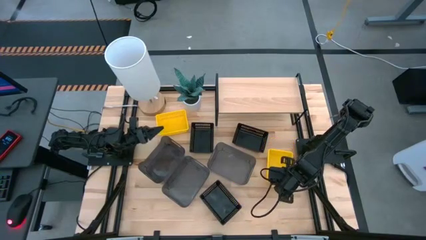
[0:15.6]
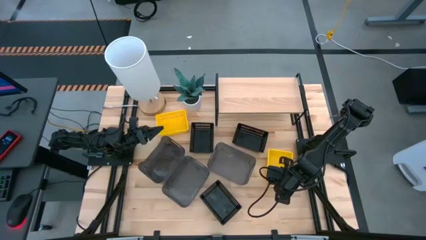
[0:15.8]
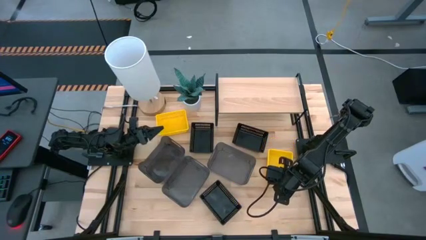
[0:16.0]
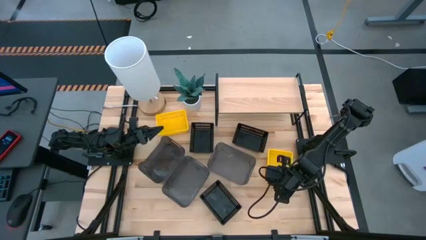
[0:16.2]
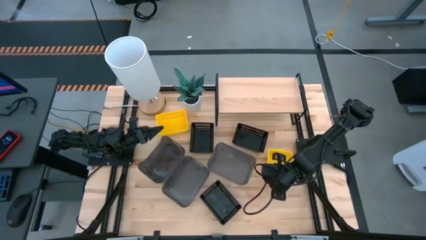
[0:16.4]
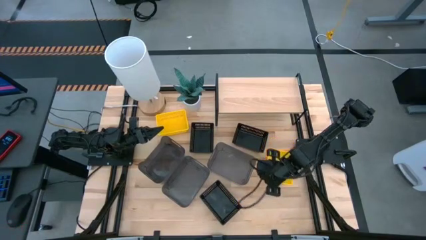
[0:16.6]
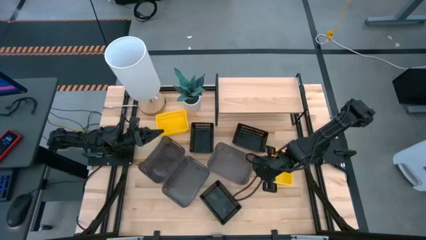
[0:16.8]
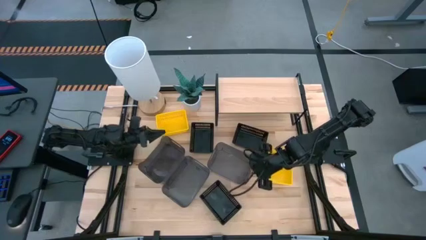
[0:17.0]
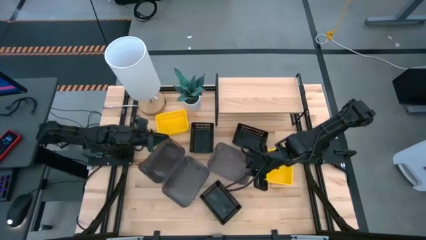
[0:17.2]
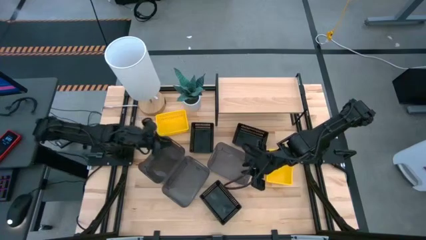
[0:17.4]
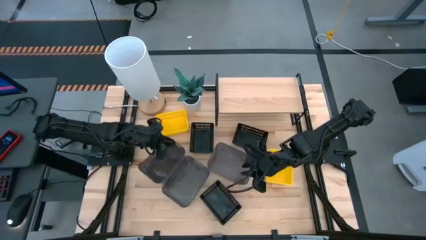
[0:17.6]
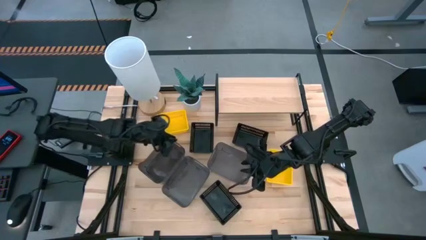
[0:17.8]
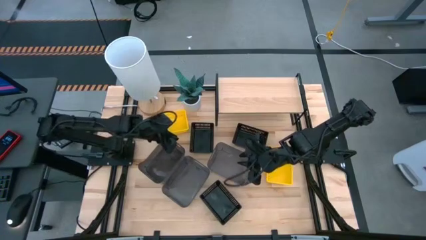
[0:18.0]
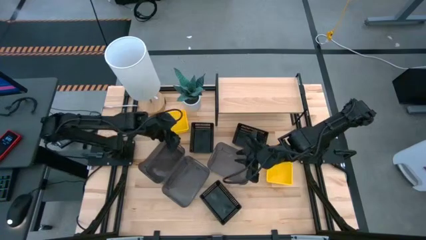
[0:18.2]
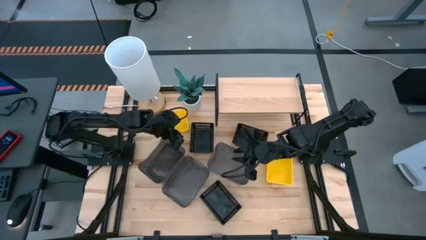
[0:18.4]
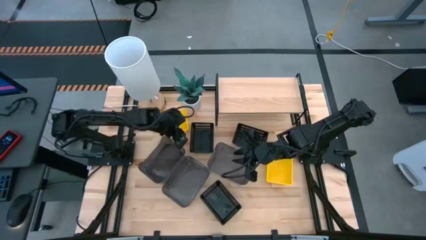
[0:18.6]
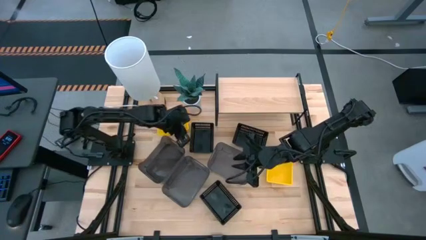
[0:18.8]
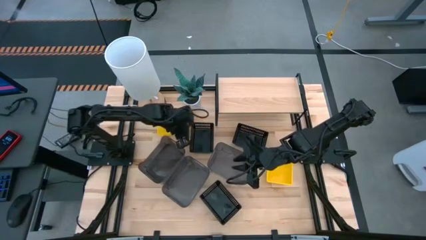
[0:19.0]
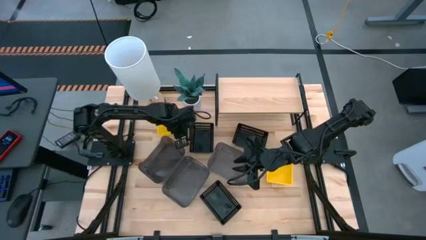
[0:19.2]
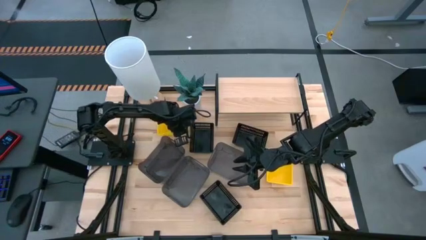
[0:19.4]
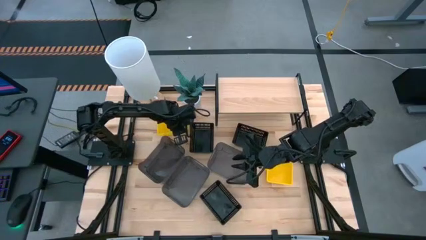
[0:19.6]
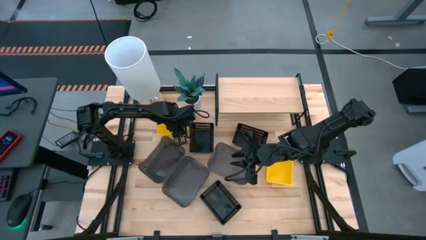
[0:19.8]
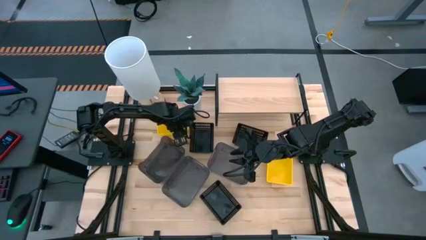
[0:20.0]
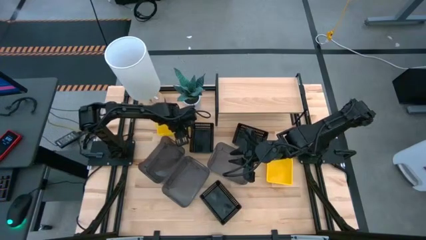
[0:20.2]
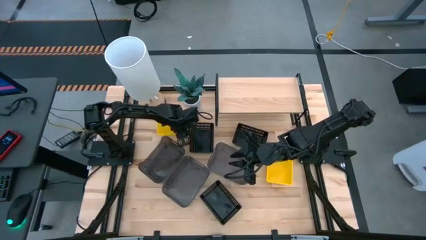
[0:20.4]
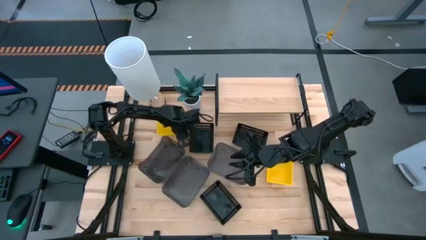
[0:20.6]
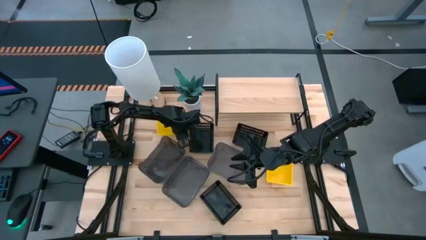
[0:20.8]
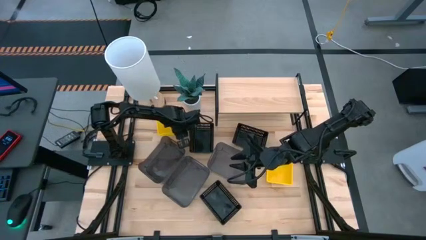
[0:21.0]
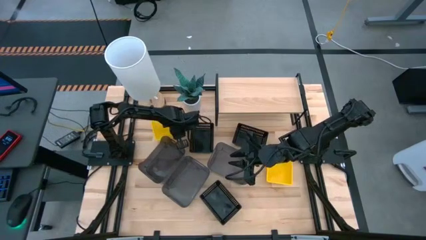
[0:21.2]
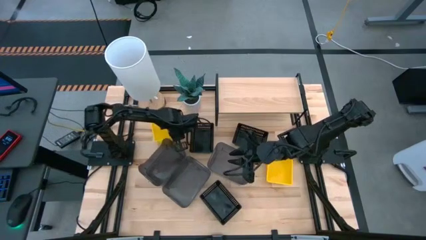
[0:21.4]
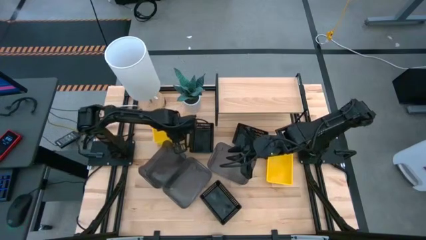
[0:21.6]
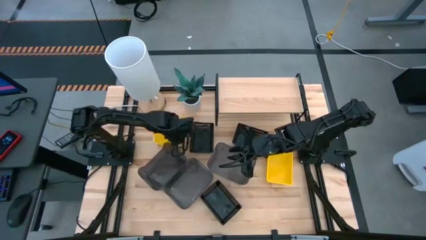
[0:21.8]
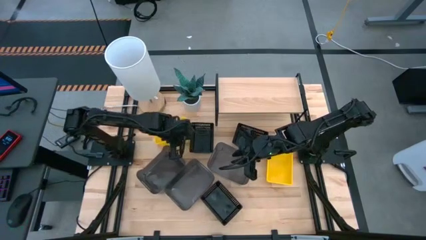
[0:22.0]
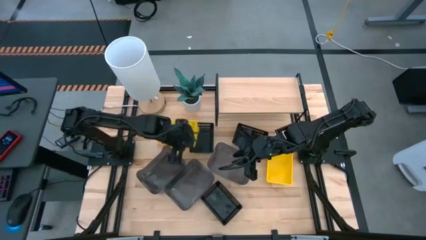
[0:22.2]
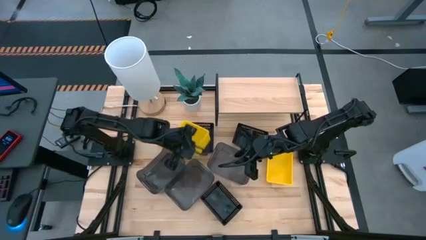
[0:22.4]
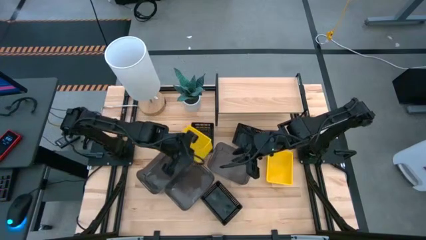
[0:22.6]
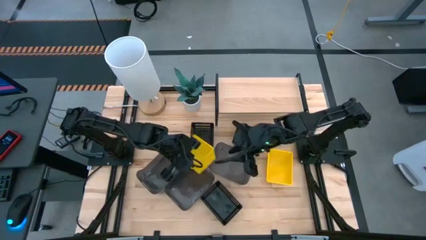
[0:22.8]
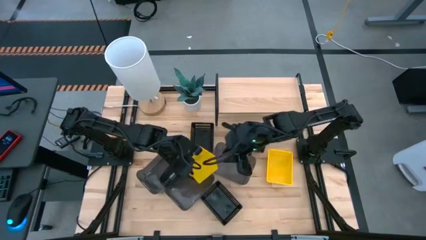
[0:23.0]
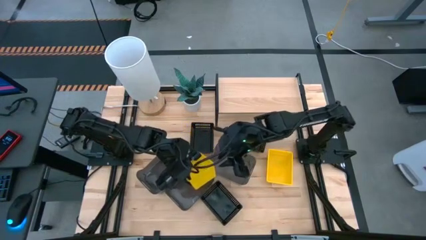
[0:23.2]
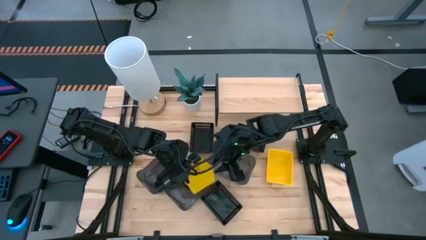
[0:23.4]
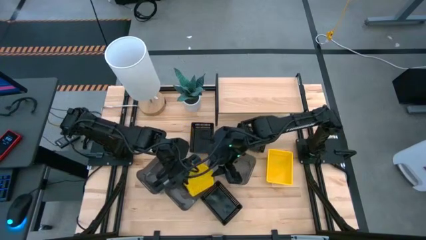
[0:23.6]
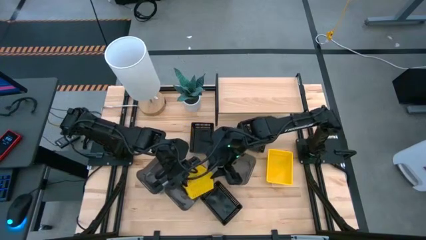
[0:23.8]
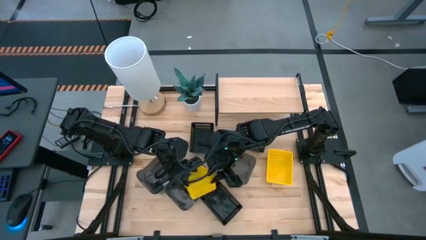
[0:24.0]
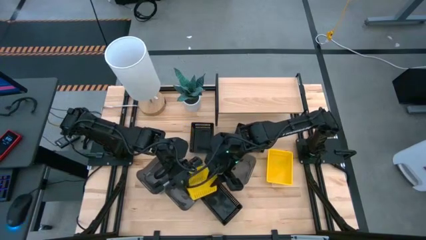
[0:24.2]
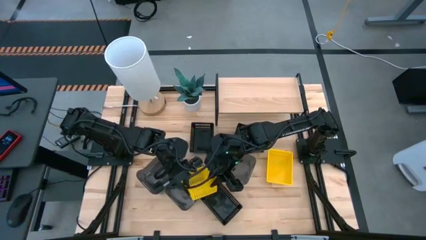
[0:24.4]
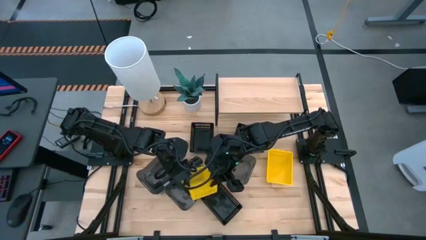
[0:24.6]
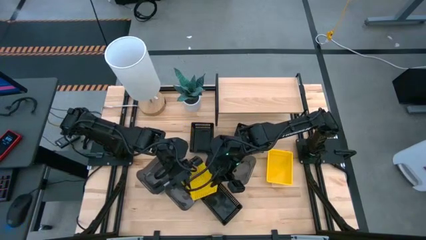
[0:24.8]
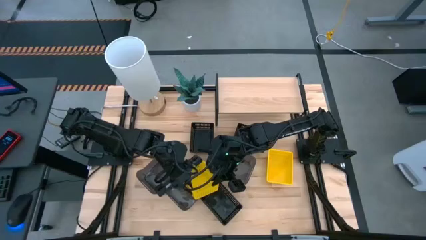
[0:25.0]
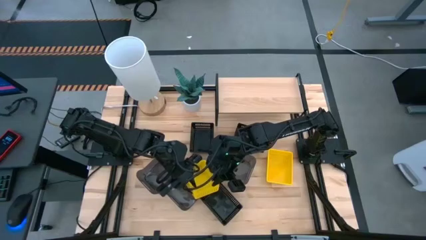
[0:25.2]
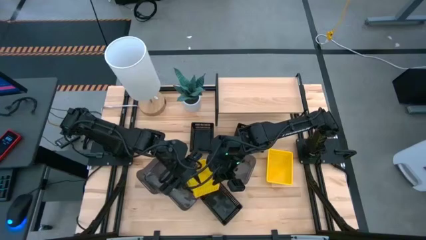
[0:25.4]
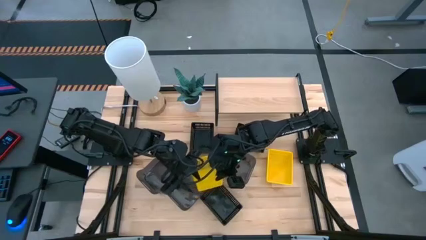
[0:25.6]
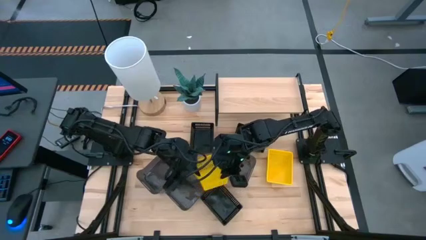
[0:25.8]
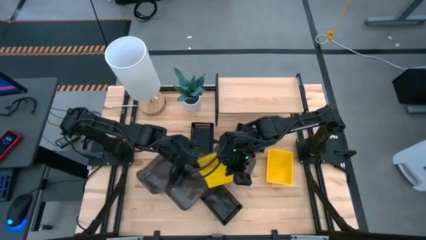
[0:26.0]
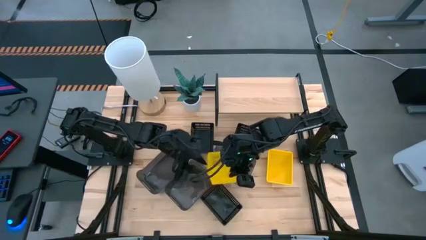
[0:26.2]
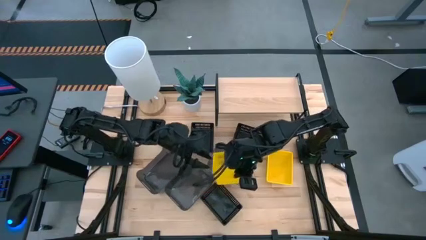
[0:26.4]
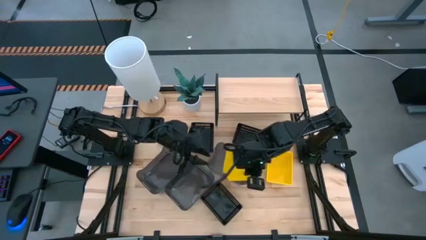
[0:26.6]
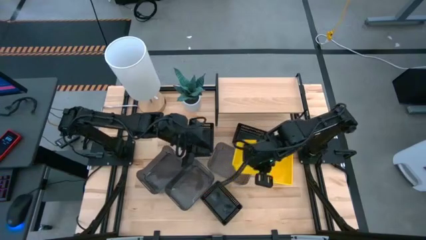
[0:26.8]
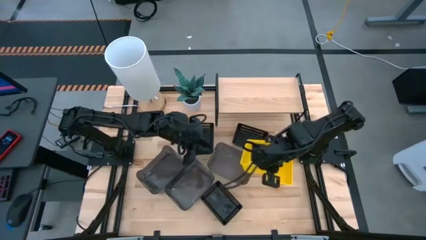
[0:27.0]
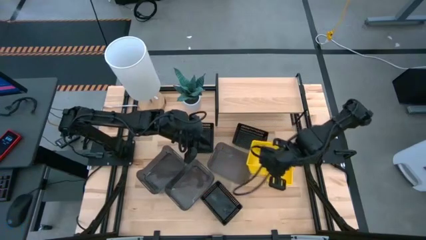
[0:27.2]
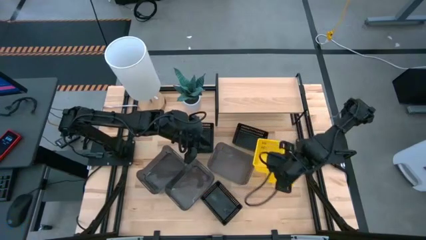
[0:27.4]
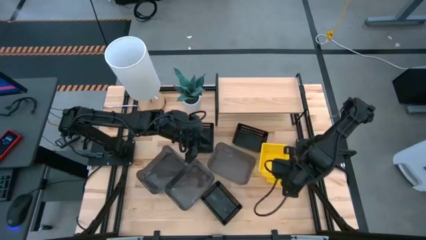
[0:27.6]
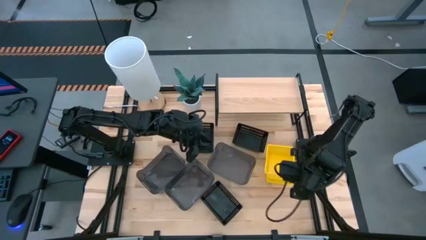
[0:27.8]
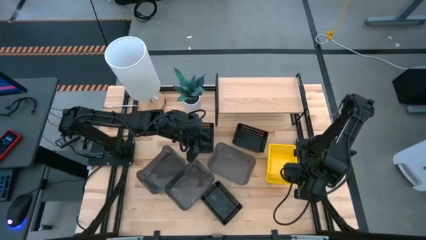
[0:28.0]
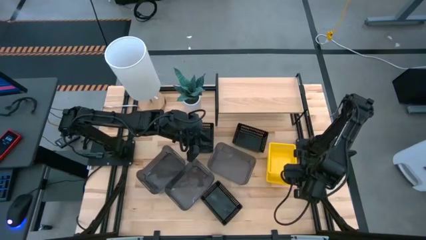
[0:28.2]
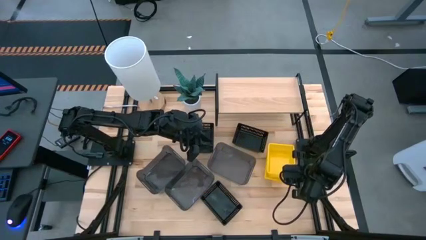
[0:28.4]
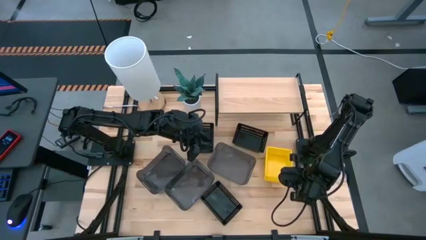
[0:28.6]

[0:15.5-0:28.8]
Task: Stack baskets on shelf by color
Stack the left yellow bin on top of the right yellow stacked bins

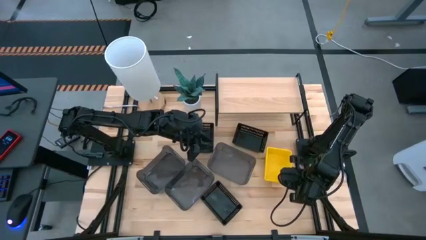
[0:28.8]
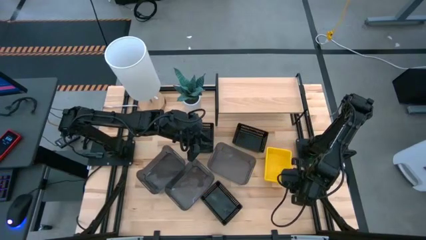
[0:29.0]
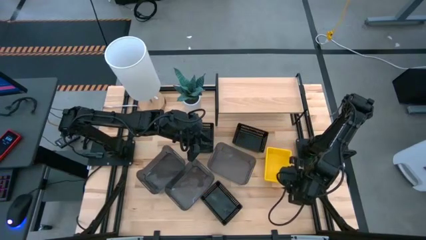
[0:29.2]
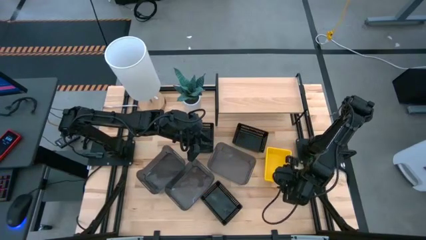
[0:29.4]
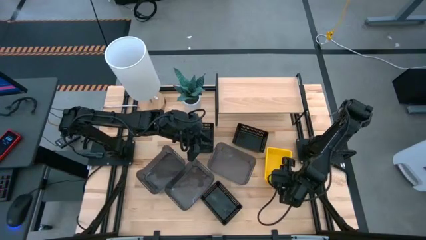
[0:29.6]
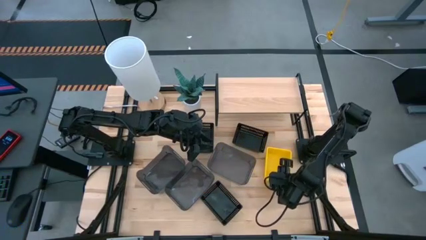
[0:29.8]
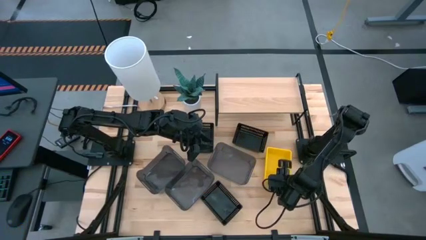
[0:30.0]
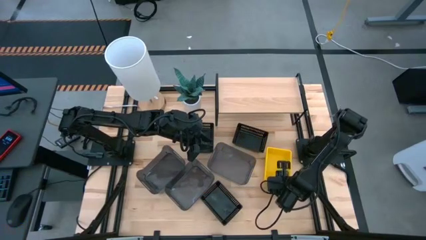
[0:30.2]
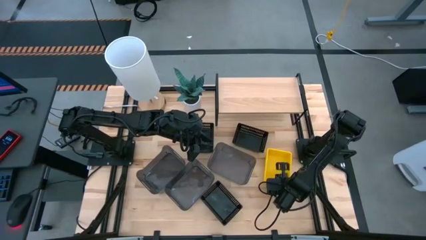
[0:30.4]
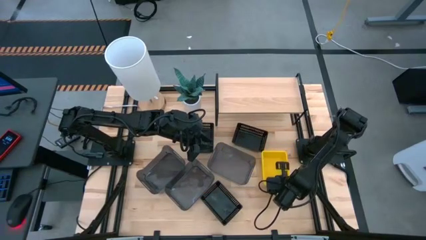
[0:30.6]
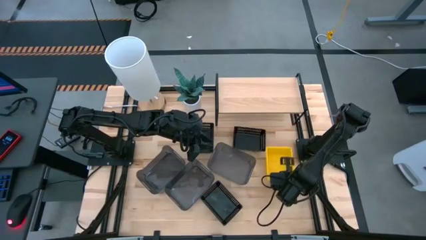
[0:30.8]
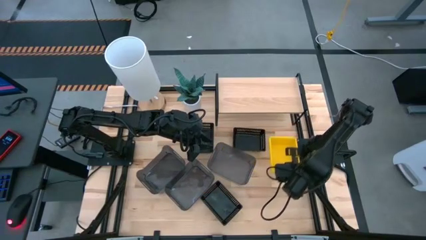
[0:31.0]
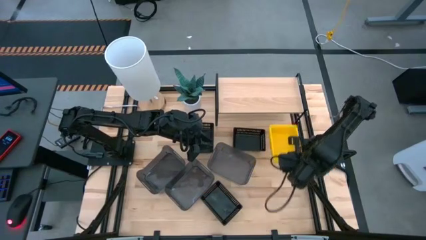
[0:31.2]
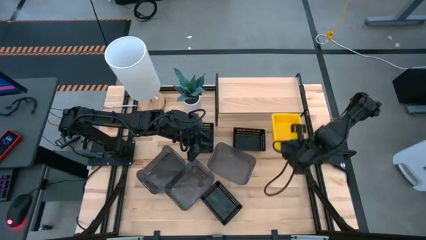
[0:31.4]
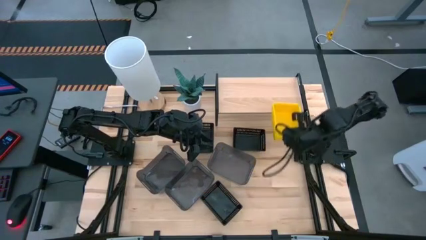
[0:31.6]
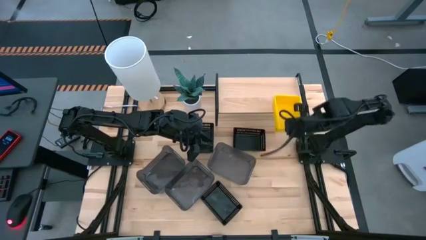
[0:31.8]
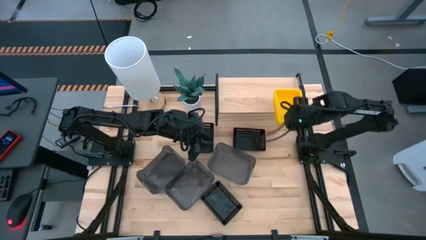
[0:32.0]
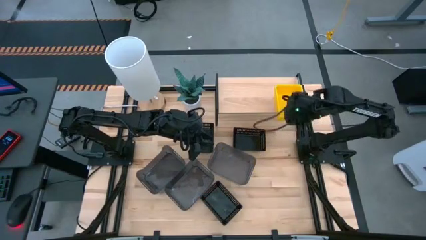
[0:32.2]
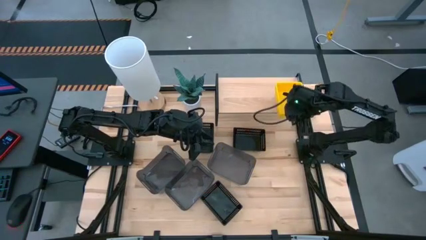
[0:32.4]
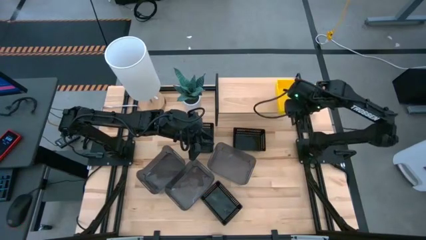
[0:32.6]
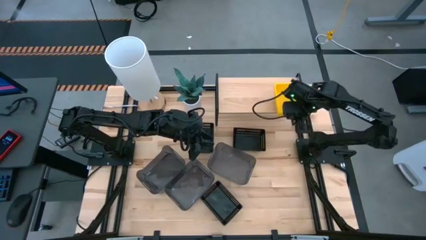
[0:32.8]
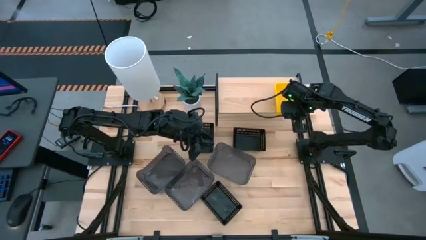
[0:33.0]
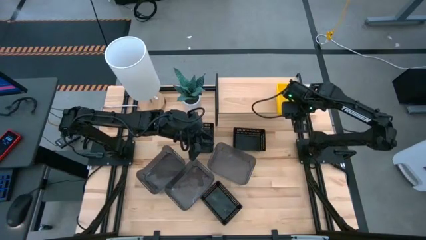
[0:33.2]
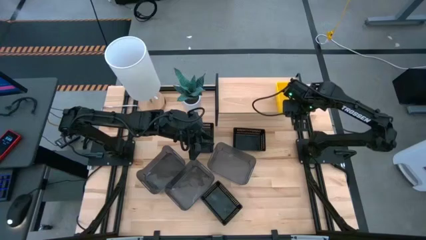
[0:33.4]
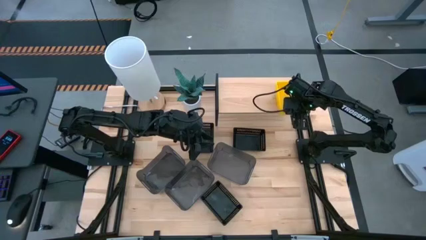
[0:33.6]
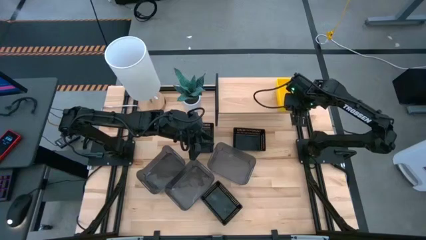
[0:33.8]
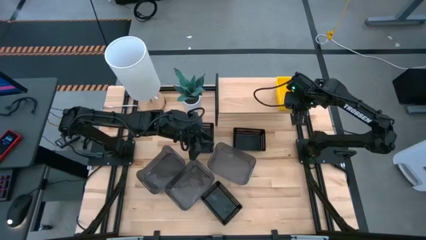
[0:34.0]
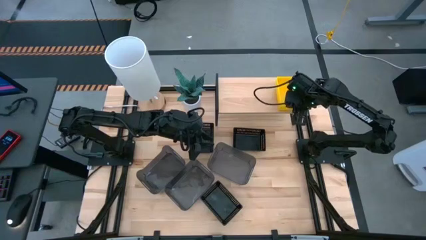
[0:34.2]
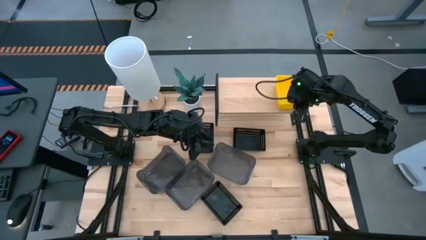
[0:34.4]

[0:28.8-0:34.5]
Put the stacked yellow bins on the shelf
